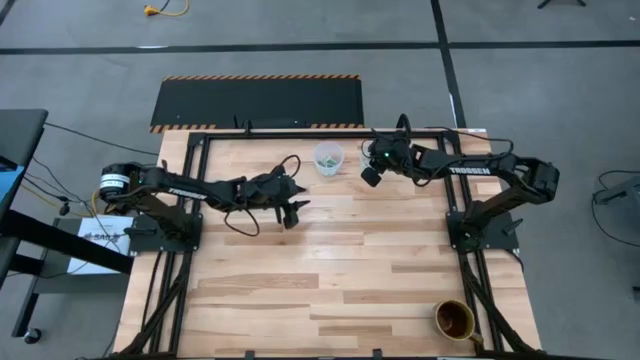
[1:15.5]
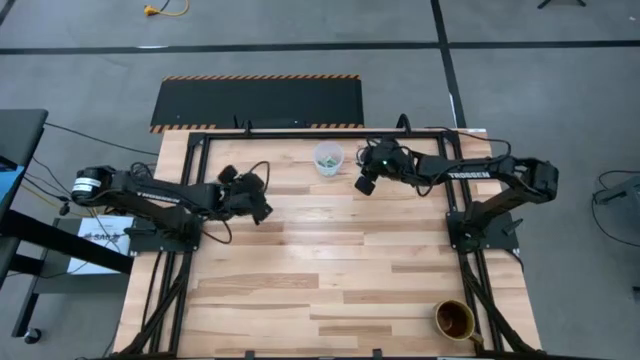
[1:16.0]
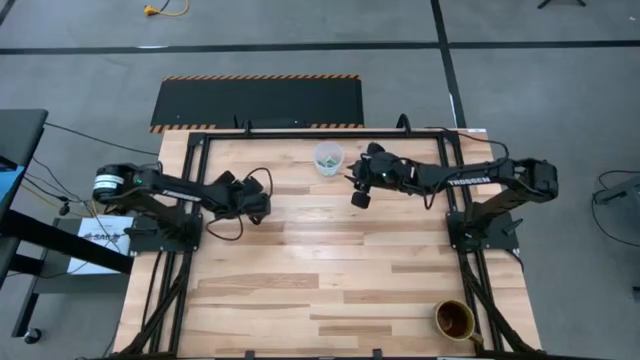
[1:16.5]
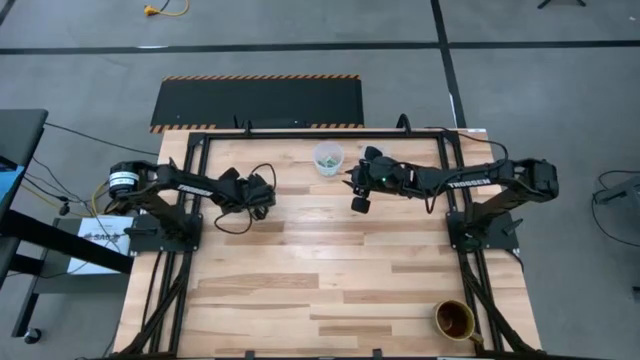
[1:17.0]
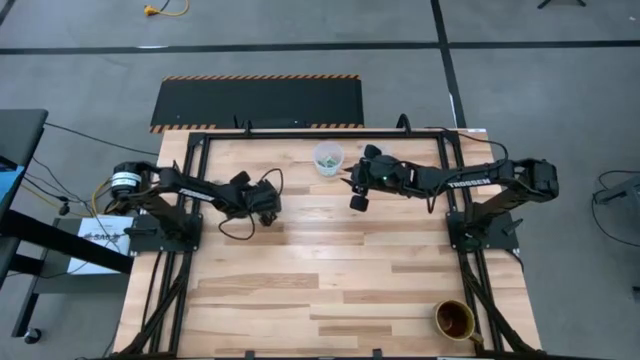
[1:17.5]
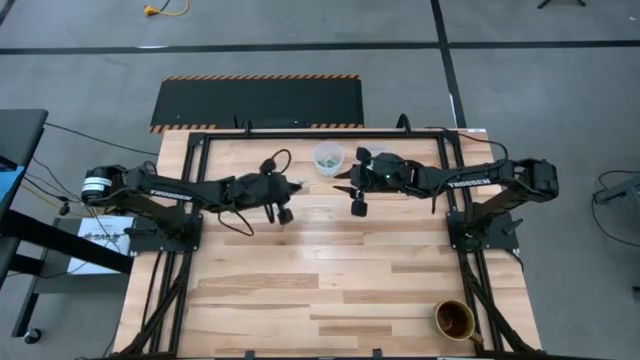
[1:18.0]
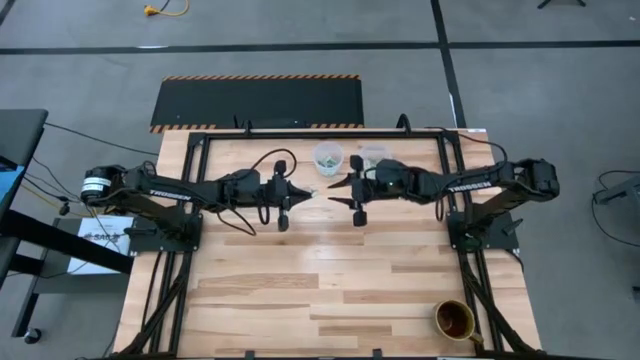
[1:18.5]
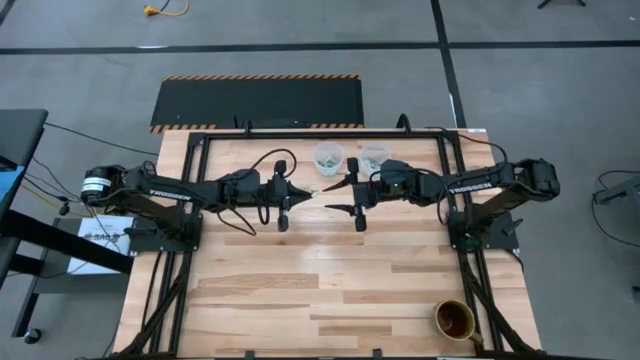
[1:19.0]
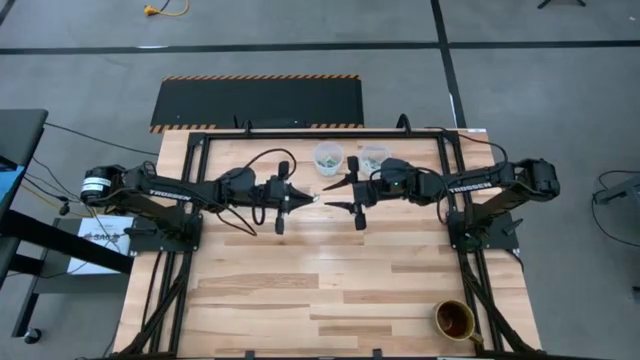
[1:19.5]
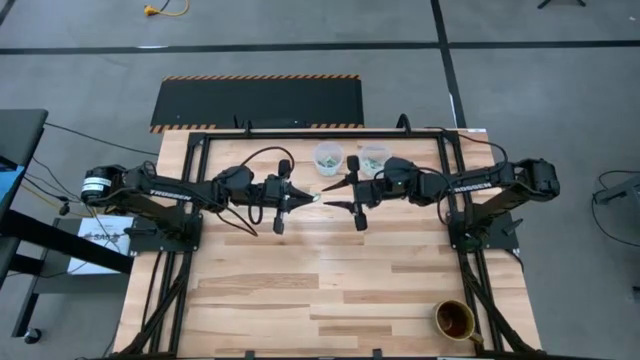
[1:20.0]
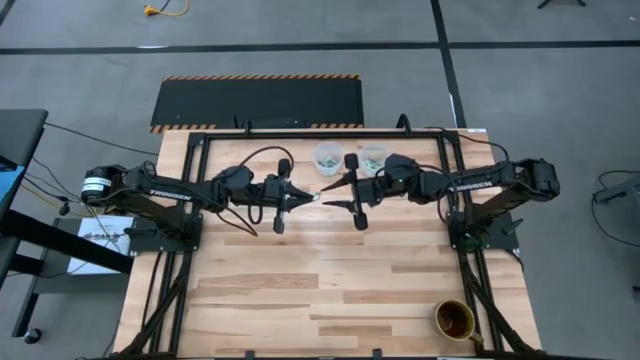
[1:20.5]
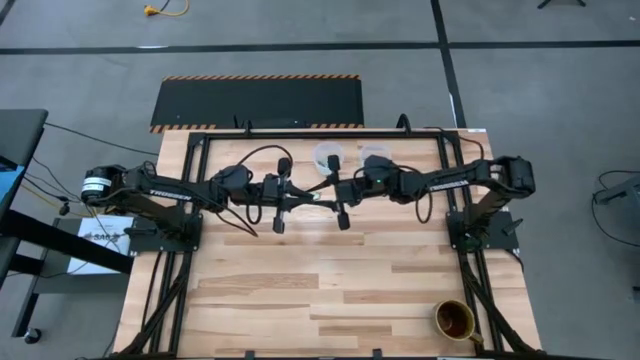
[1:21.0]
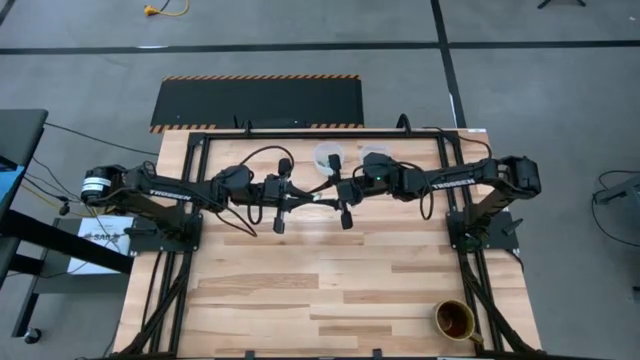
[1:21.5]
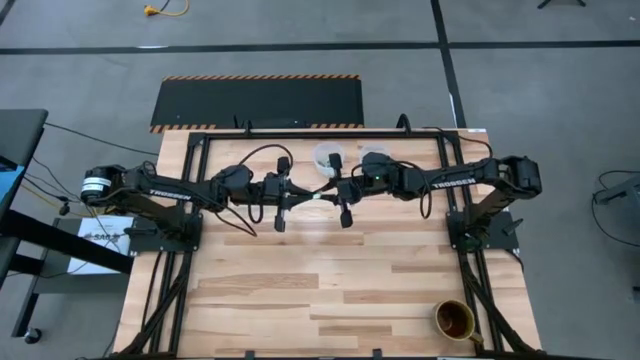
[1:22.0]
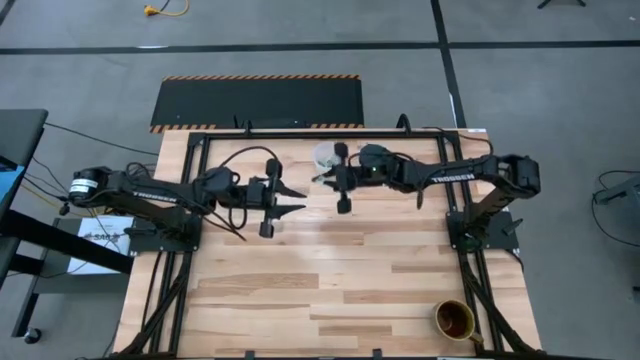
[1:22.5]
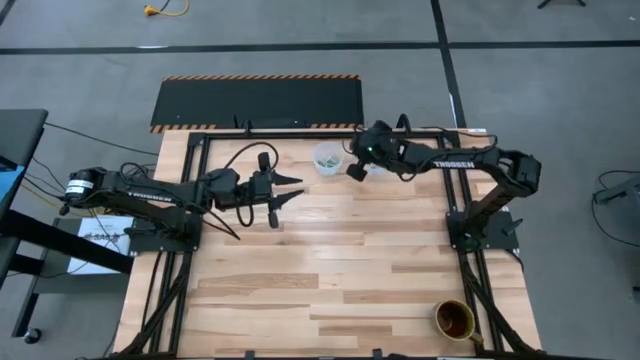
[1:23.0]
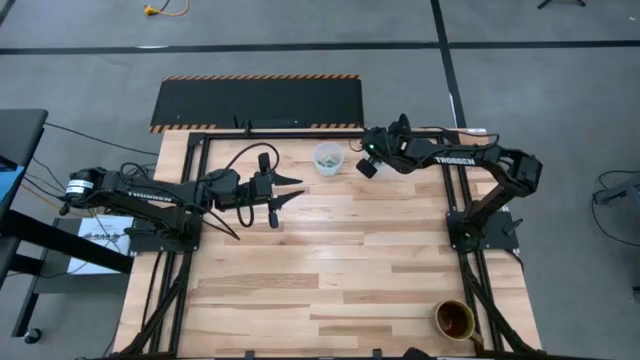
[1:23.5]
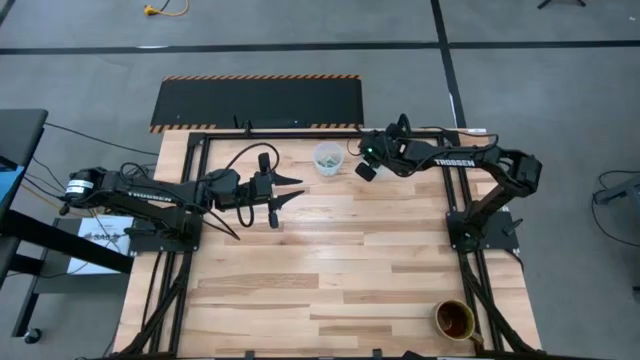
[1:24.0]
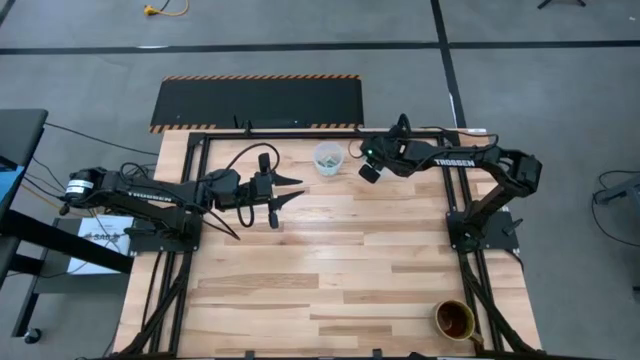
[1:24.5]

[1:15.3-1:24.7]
Task: Pick and place Stevia / Truvia into bins
Put the stevia packet into the right transparent container

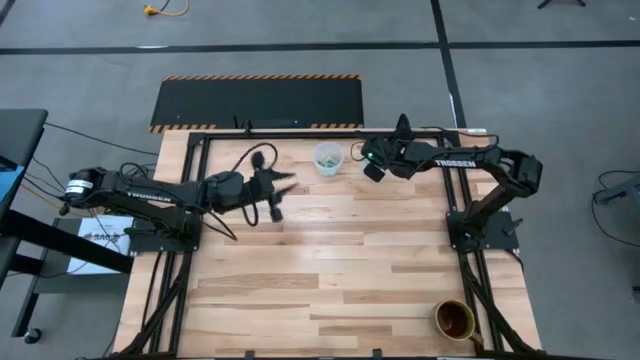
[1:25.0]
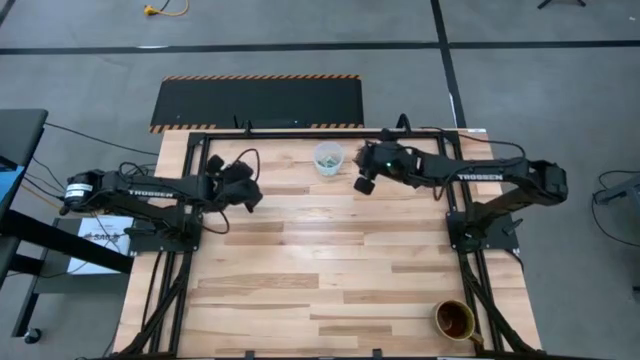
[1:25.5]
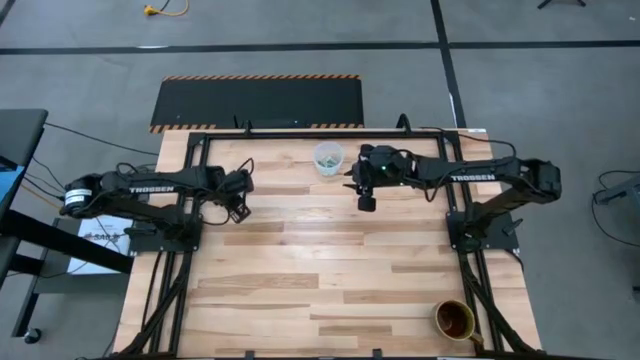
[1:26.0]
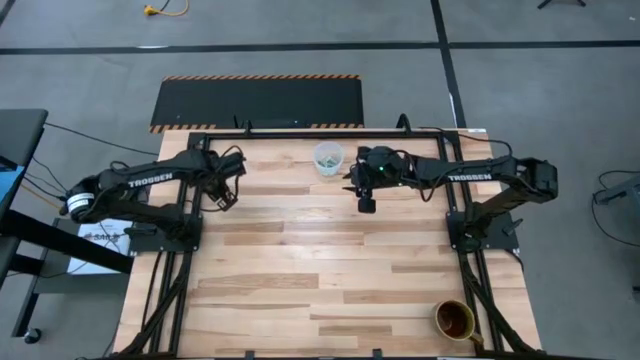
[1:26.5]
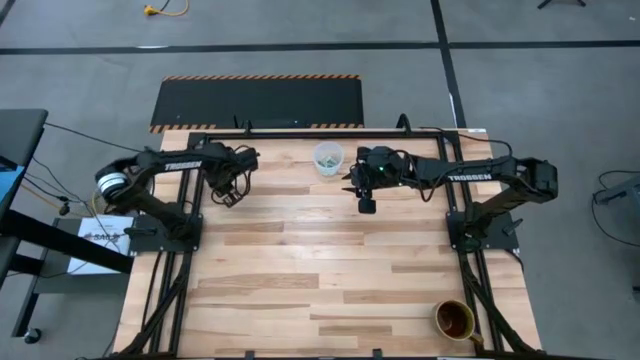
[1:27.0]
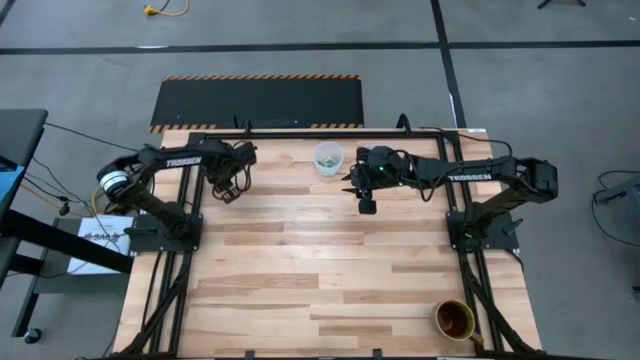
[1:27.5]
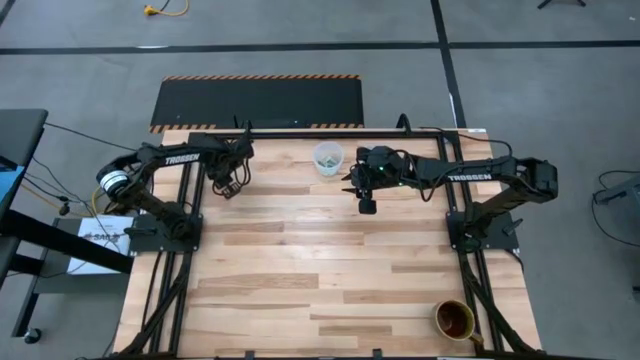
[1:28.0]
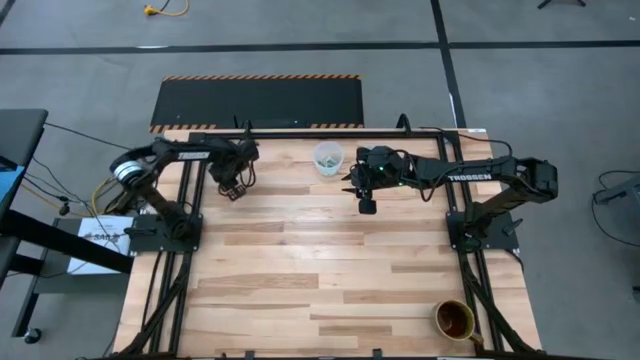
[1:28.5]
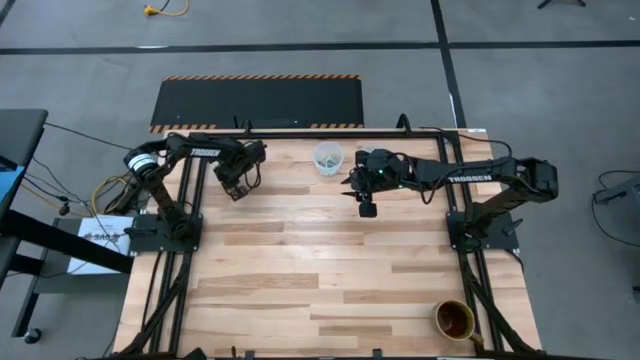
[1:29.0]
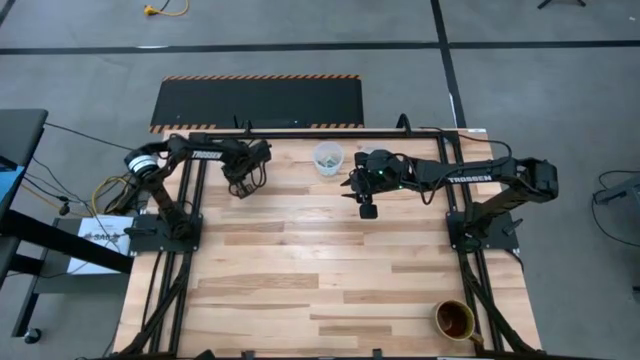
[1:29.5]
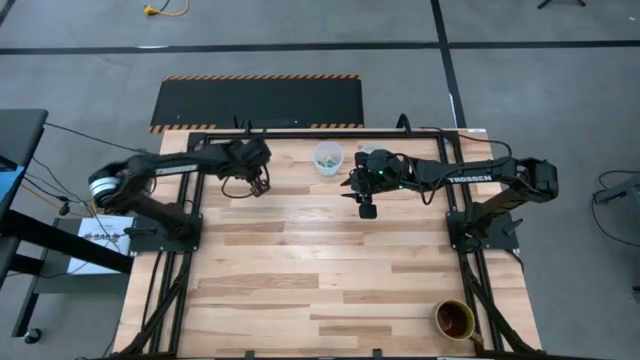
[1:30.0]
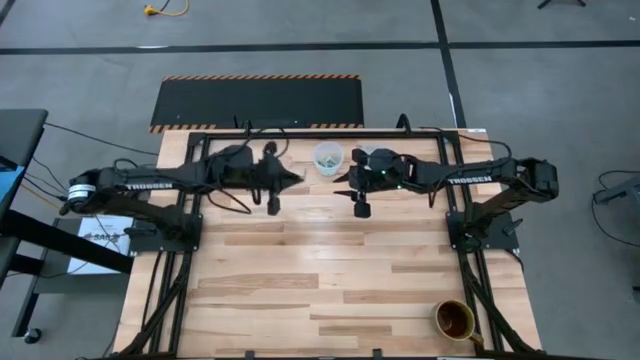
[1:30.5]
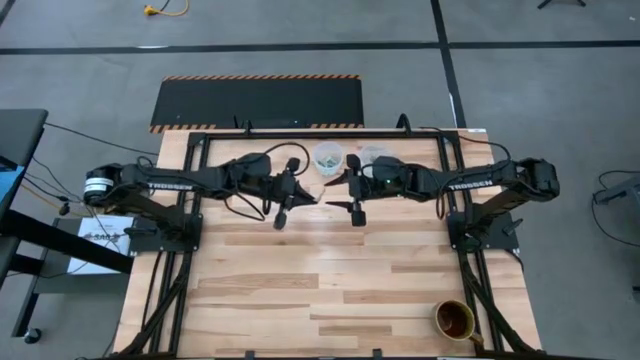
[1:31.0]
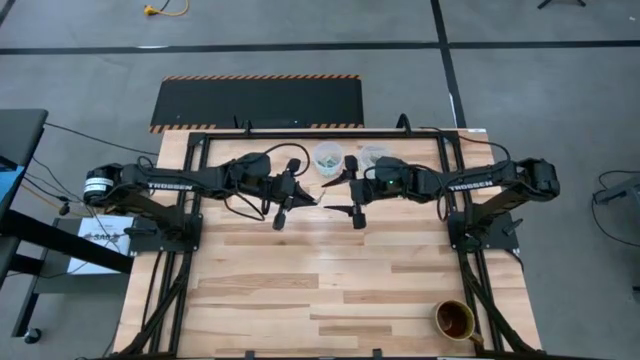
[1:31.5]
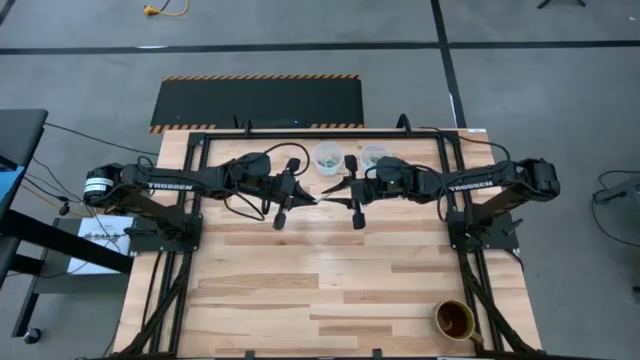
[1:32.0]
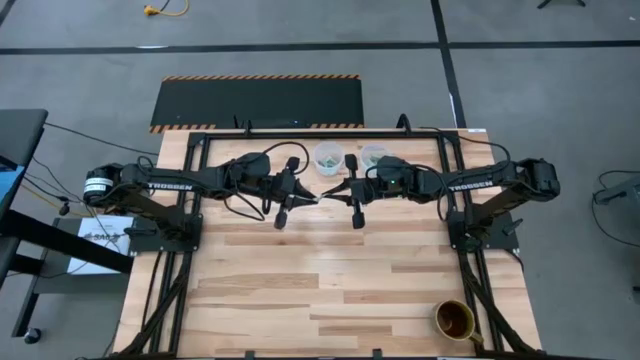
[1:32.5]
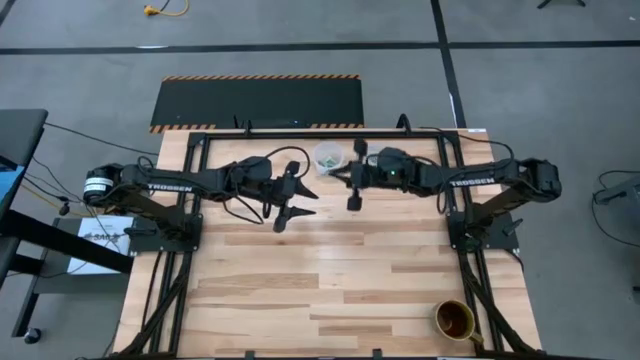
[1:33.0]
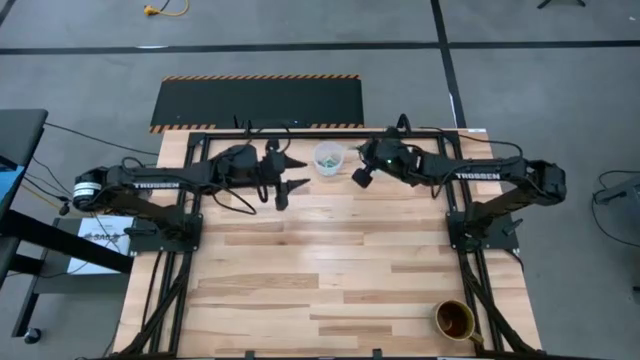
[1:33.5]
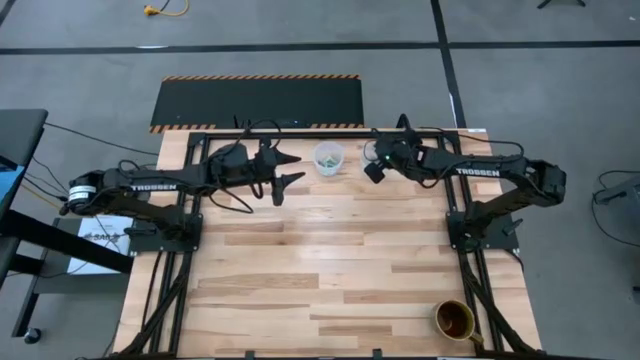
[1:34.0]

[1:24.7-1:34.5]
Put the stevia packet into the right transparent container

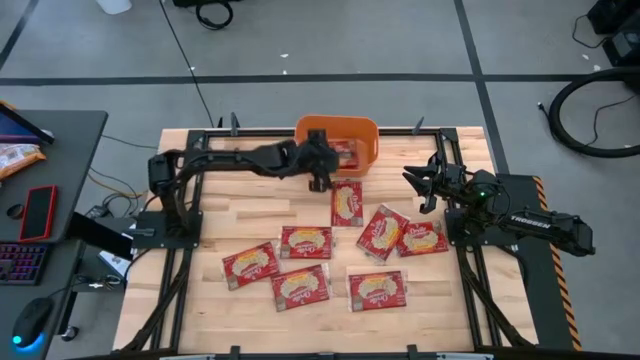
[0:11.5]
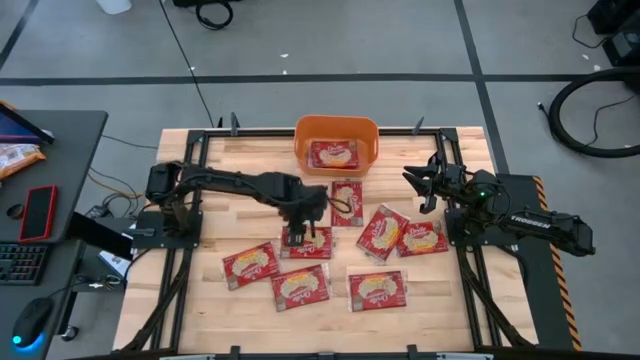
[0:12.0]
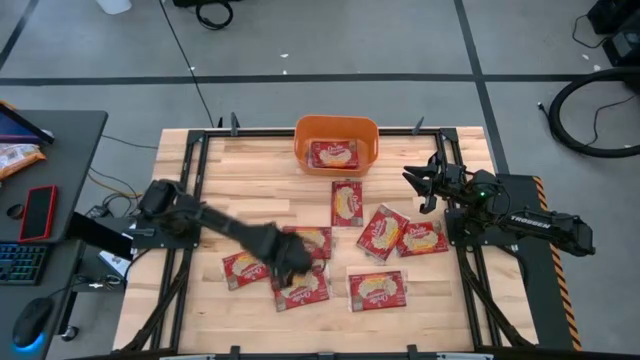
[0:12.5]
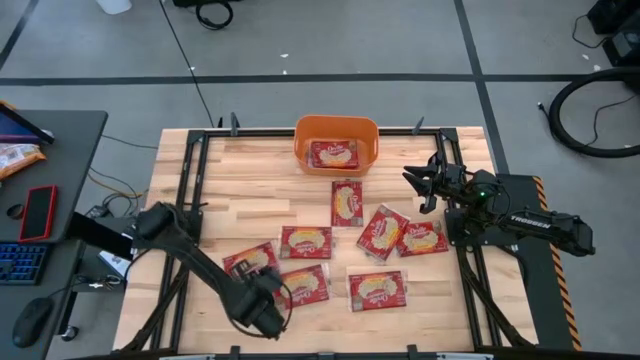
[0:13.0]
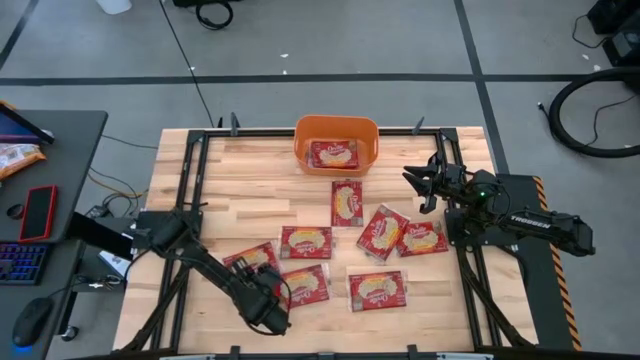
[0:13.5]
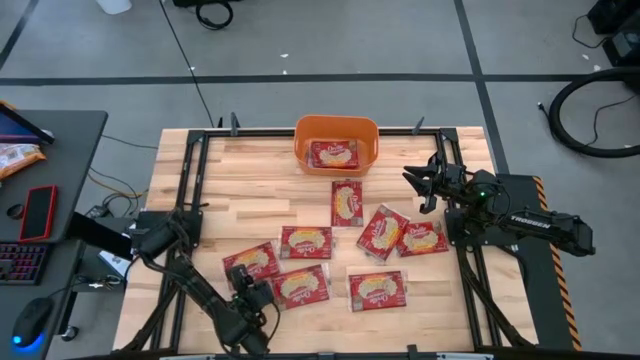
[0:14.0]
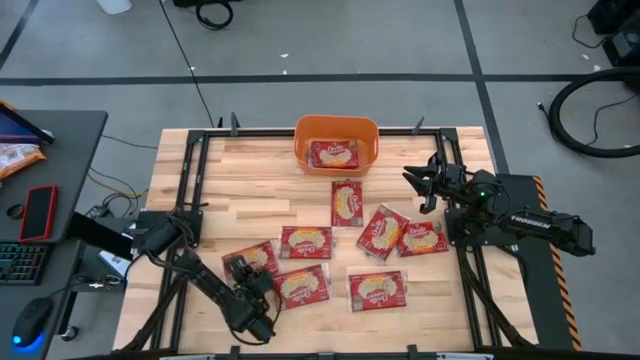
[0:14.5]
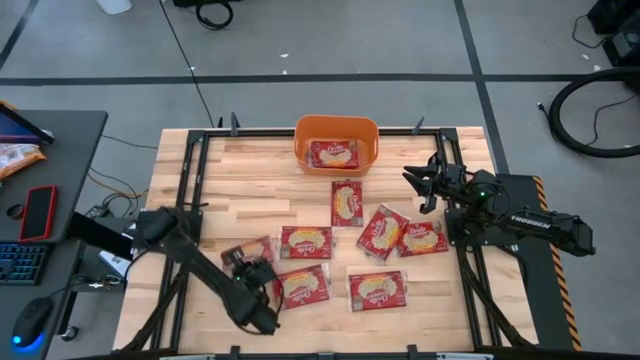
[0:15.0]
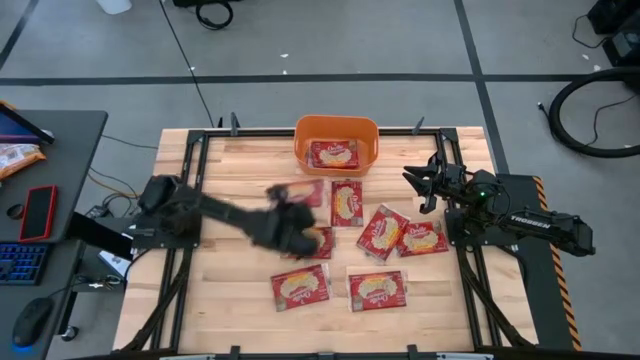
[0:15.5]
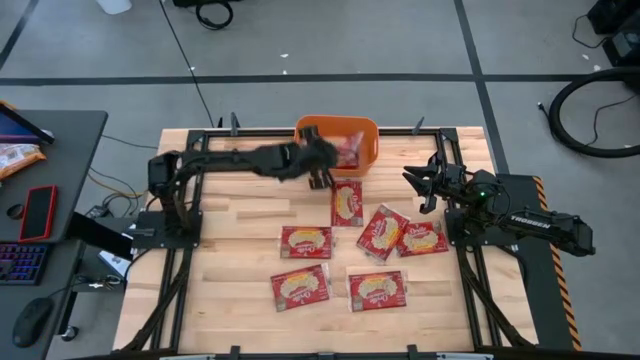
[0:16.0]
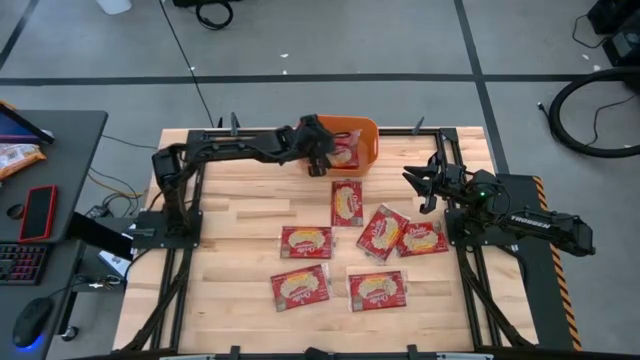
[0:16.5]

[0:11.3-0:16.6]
Task: Sort popcorn bags into baskets
Put the red popcorn bag into the orange bin
